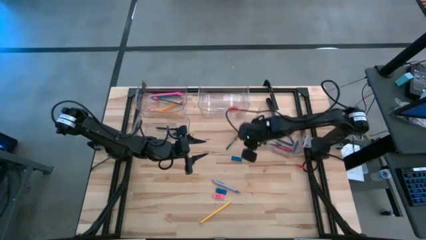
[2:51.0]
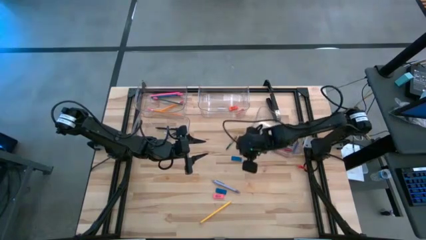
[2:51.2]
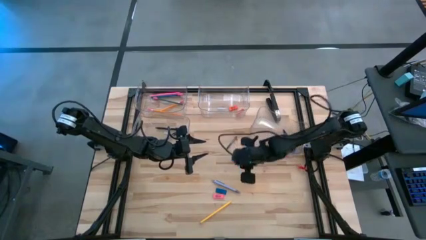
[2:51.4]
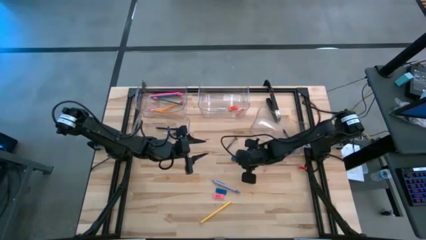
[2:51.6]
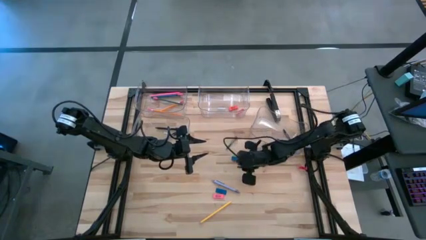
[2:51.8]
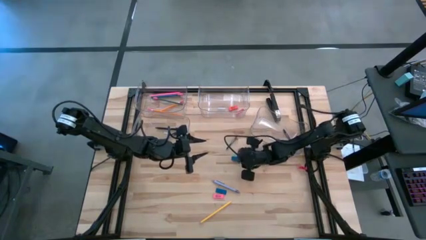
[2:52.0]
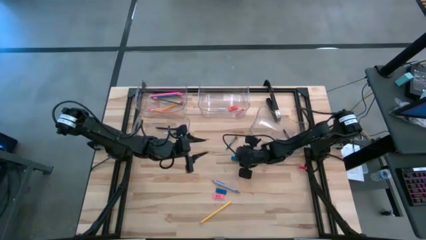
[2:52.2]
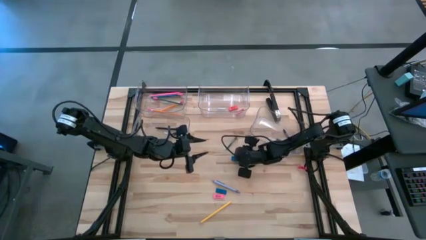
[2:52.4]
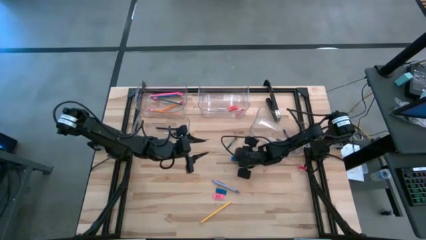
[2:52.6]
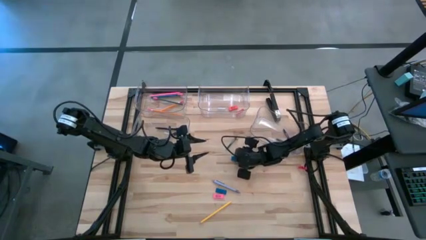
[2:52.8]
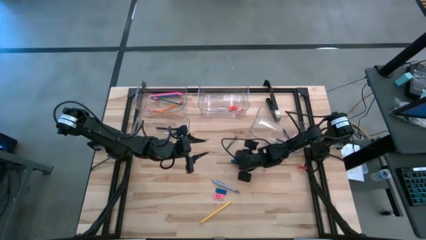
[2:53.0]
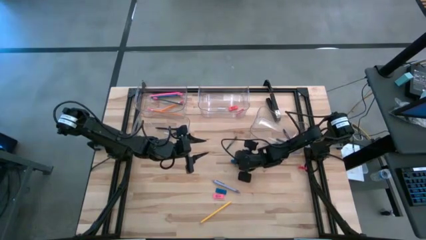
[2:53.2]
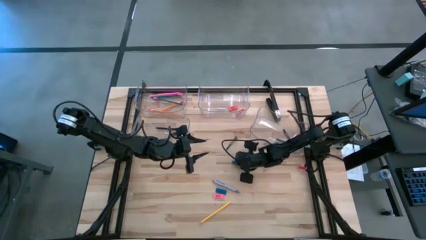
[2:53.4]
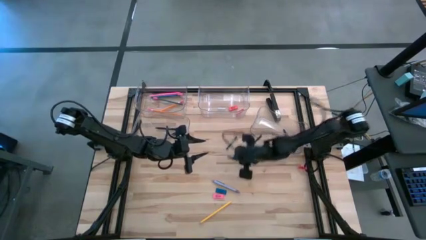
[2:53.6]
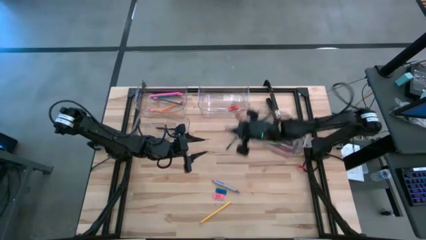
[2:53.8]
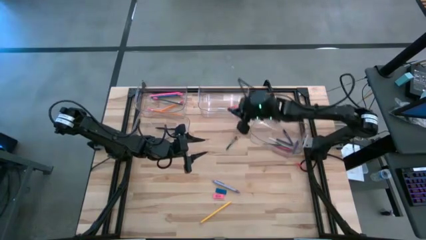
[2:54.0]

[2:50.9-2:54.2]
Task: Sort crayons/erasers/pens/pencils in bins
Put the blue eraser into the top right transparent bin

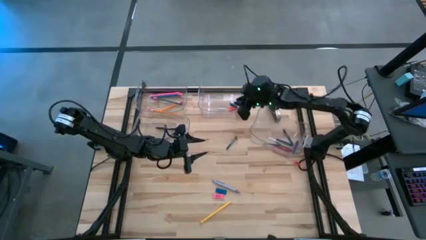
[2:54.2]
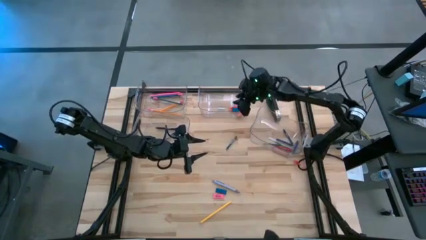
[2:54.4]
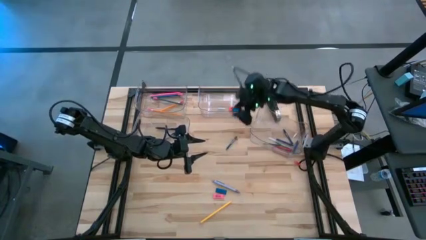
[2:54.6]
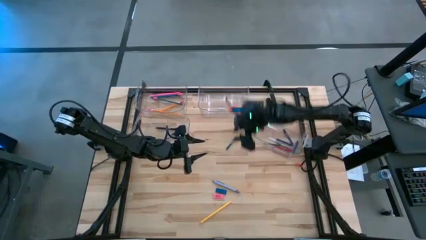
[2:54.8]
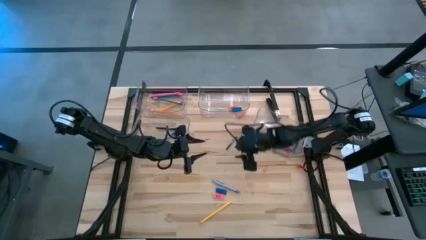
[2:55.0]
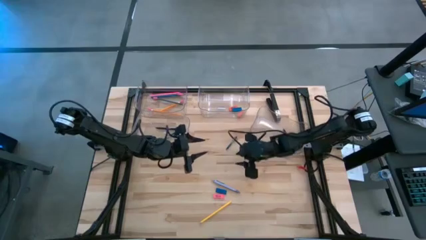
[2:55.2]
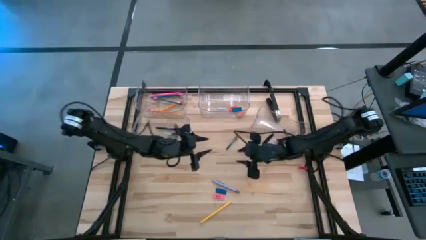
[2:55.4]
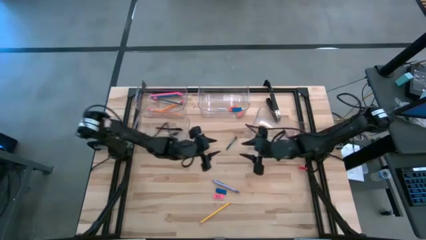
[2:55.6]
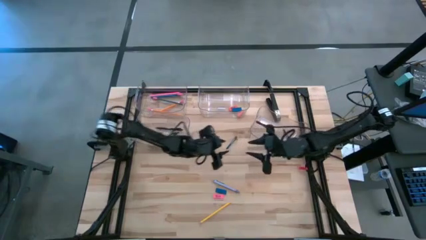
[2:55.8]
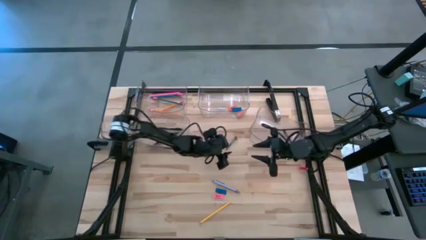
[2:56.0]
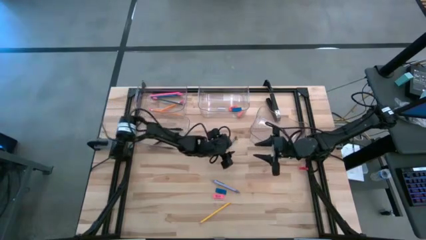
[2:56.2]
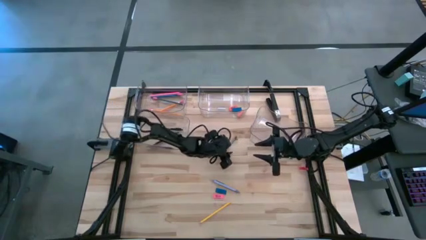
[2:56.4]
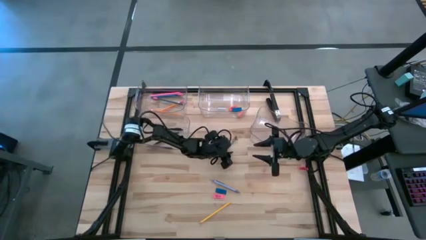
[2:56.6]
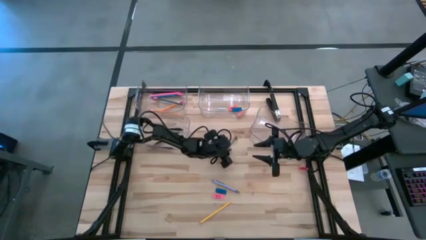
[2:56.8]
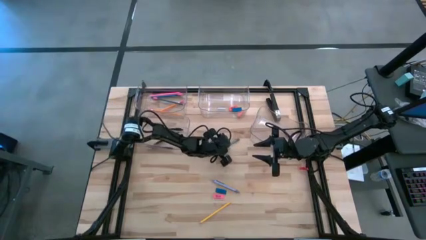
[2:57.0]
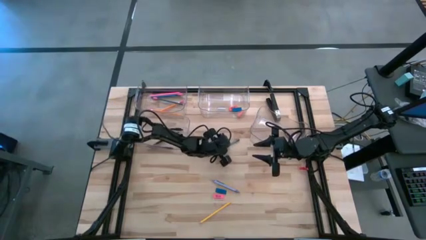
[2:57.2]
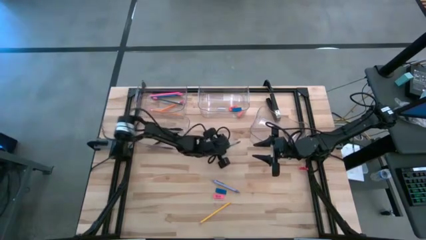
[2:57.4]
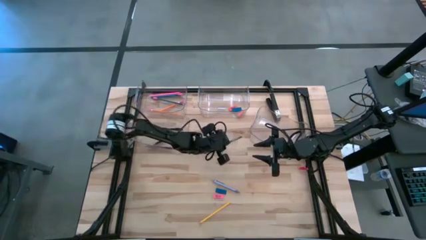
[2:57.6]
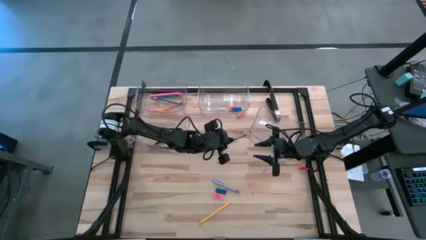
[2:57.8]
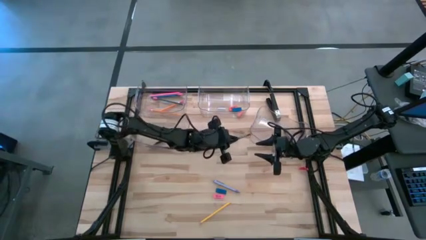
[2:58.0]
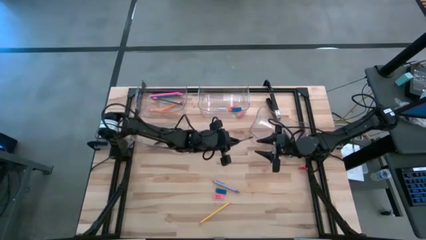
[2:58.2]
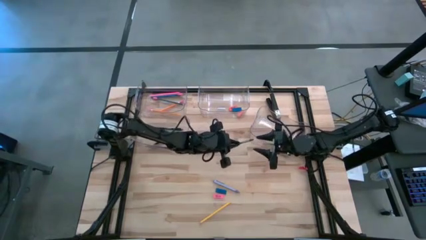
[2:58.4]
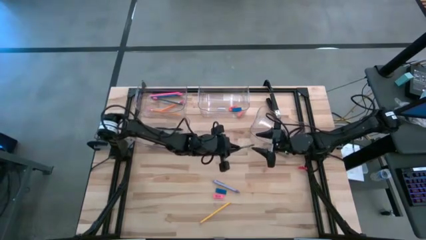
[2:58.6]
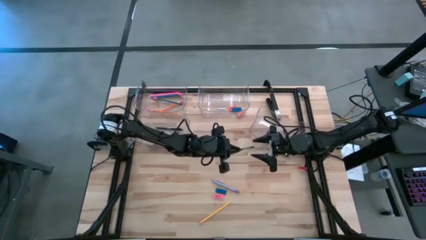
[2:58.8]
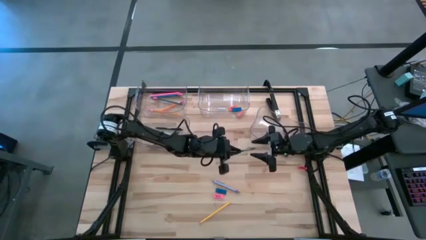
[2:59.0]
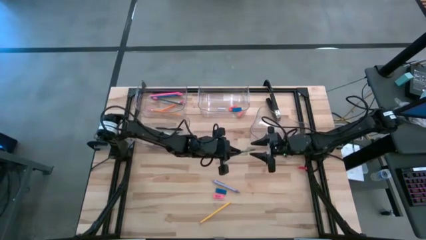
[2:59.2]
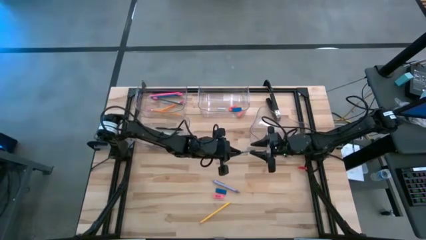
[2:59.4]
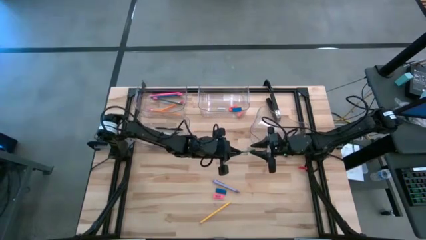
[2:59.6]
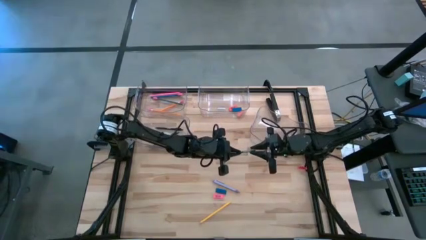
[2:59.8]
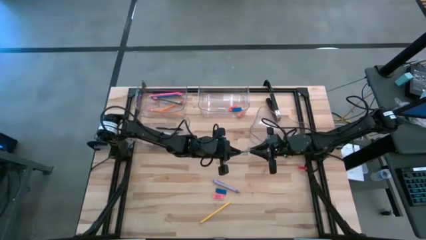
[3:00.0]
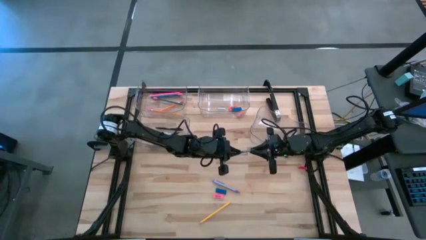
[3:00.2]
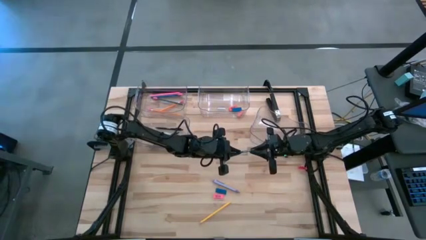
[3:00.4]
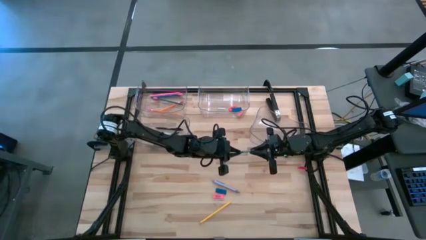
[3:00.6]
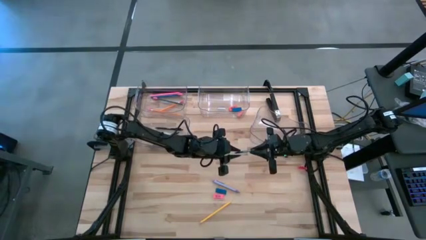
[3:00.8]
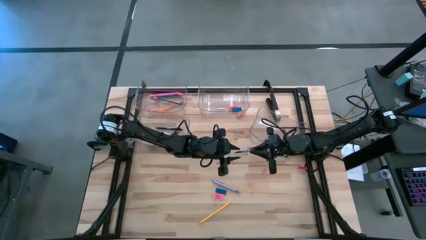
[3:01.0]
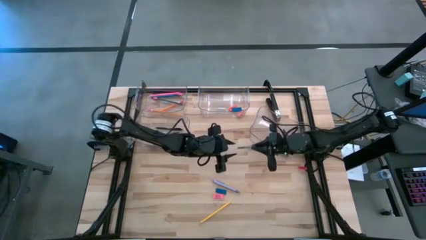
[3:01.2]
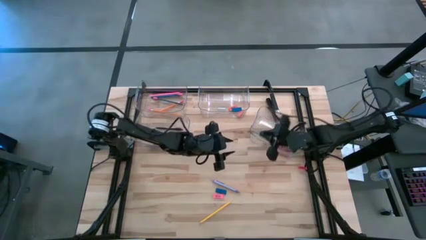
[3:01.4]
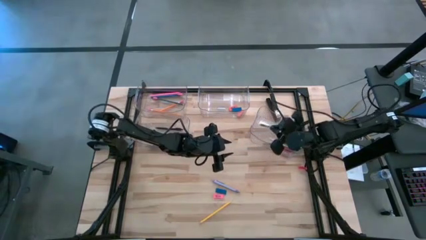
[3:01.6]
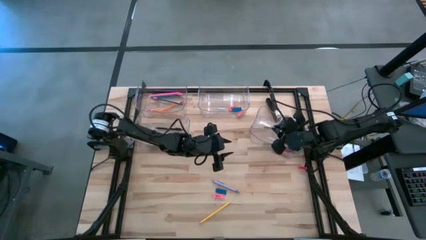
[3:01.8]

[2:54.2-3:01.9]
Put the green crayon into the bottom right transparent bin

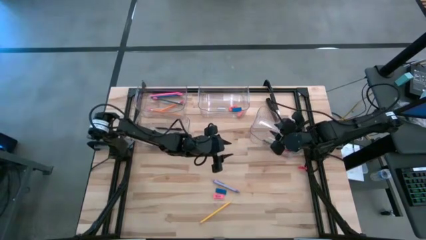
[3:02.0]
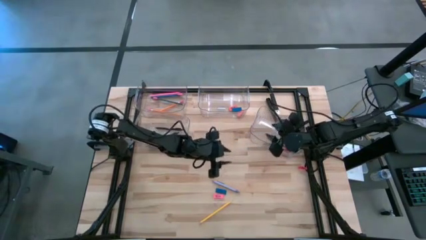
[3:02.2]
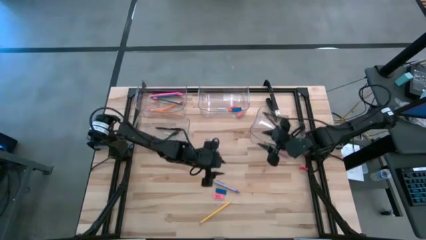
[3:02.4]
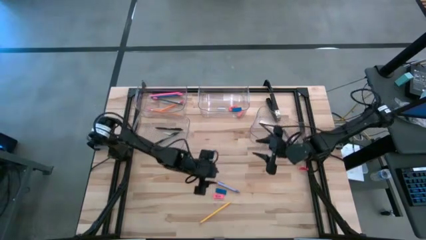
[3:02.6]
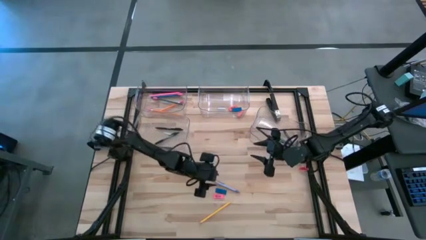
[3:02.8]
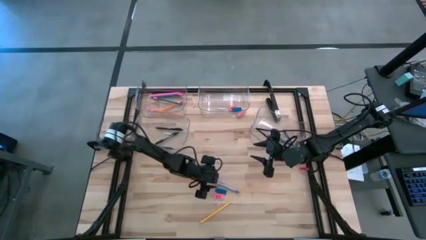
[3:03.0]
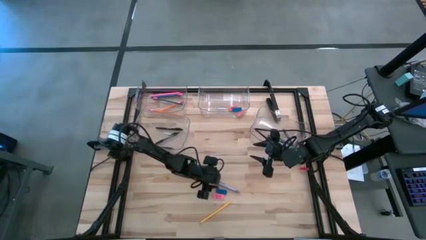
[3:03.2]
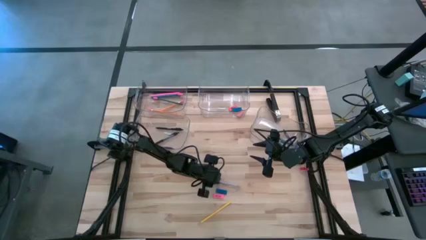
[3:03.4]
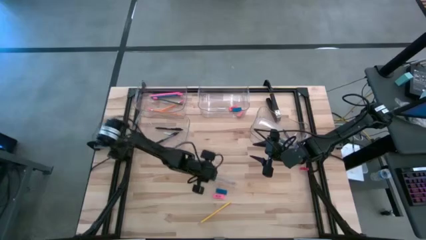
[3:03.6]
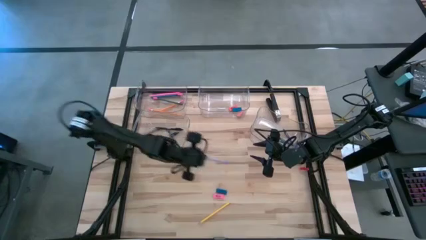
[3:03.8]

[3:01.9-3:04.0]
Put the gray pen into the bottom left transparent bin

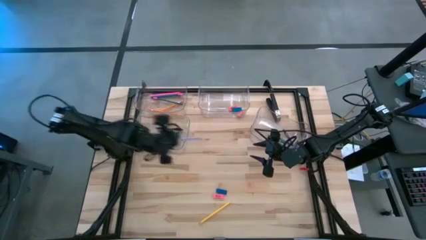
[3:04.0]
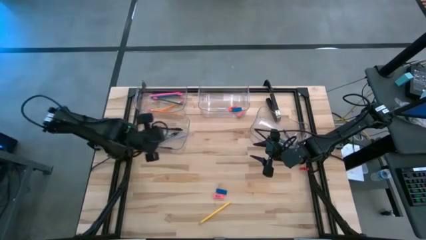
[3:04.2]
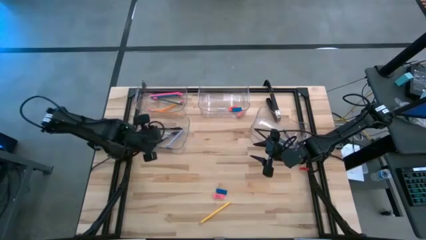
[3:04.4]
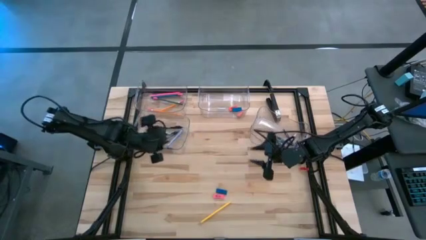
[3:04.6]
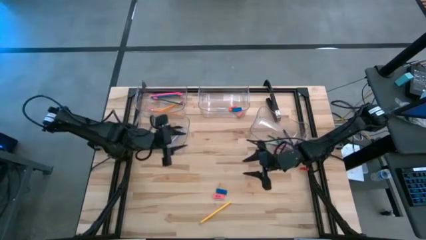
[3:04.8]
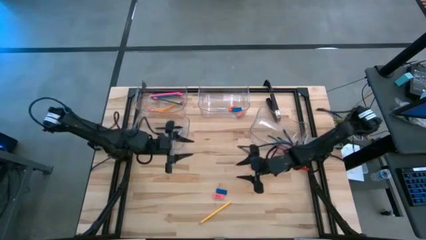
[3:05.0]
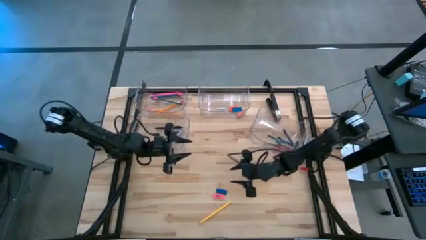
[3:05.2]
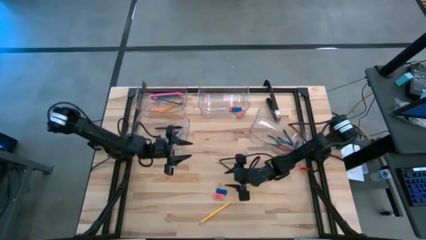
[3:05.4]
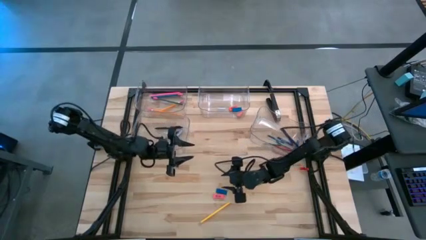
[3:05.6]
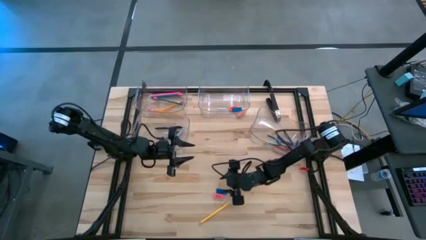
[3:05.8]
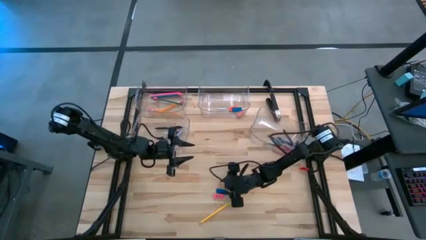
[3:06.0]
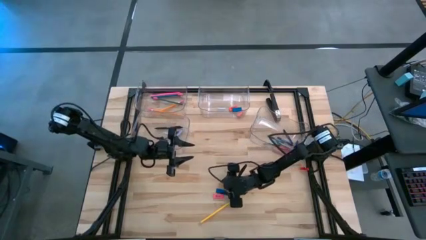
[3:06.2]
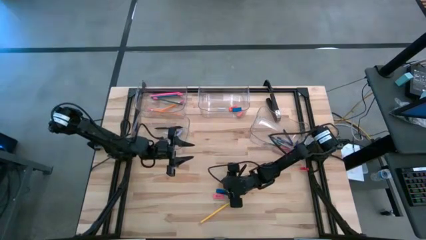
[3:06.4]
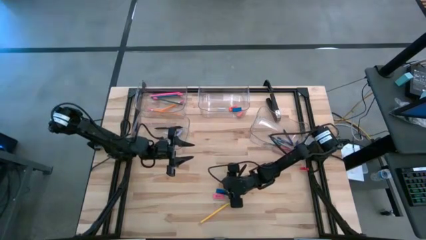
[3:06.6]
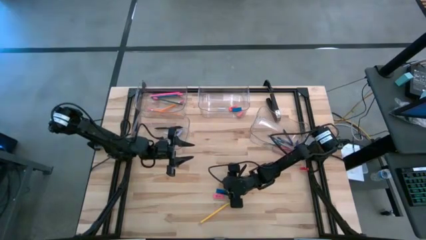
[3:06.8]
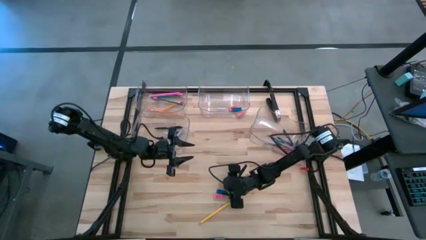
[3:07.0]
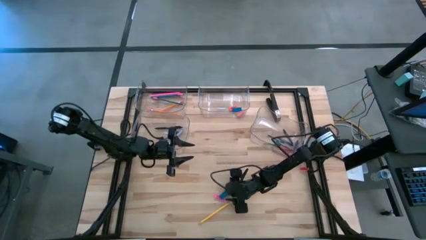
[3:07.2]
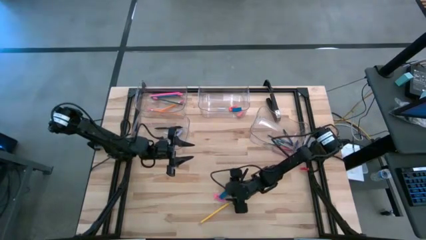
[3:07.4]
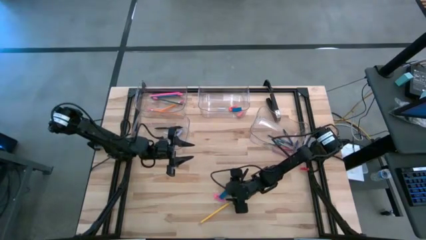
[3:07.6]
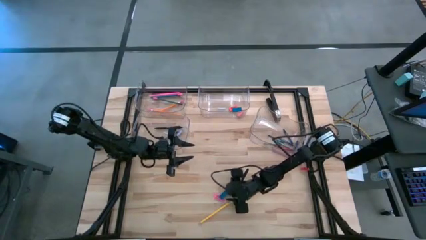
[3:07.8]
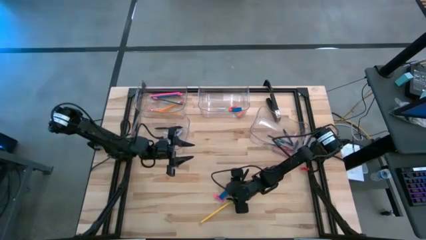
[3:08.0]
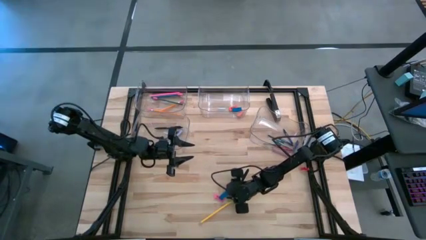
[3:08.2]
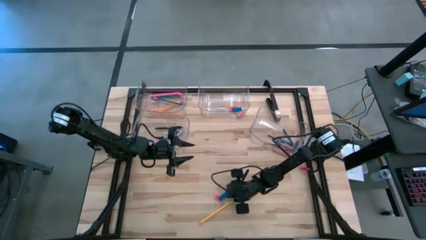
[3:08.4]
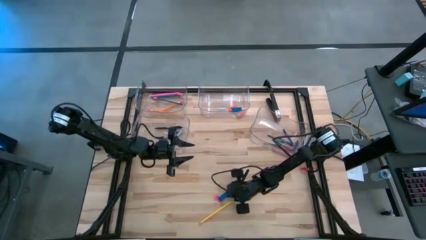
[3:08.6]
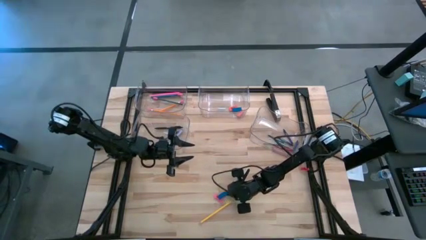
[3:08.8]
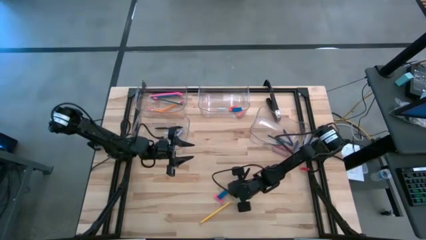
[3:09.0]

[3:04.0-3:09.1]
Put the blue eraser into the top right transparent bin
